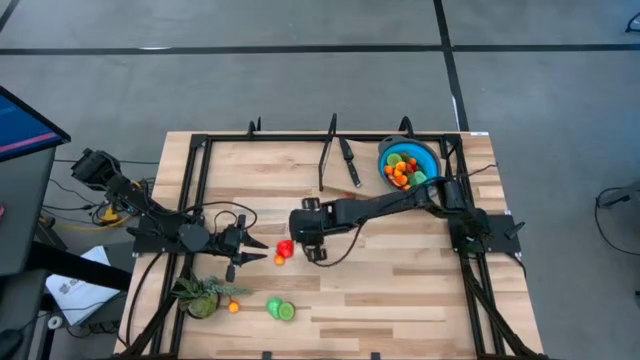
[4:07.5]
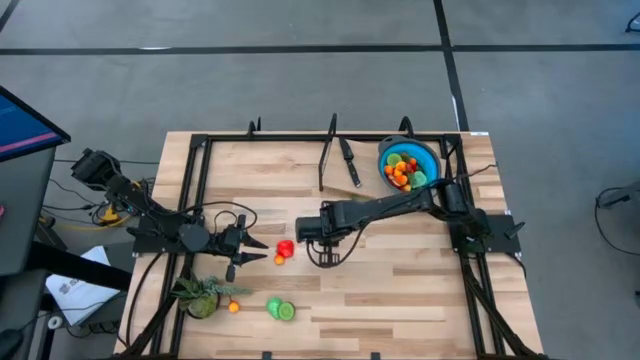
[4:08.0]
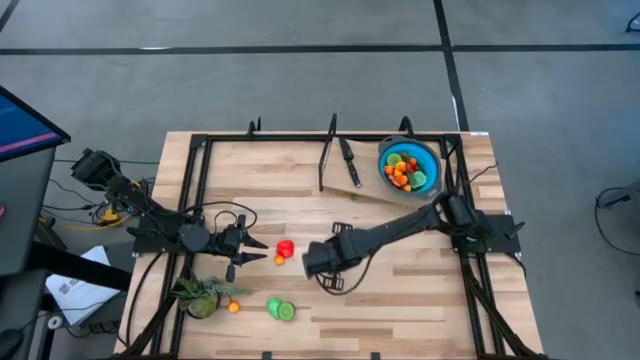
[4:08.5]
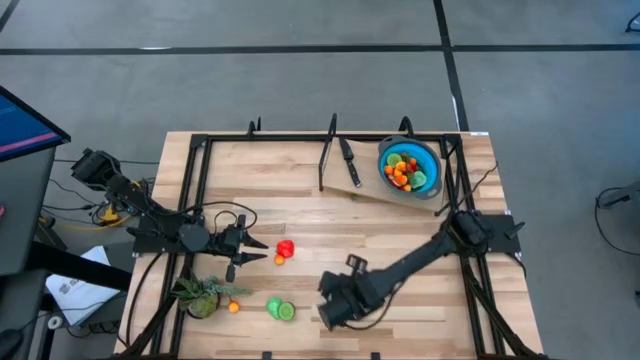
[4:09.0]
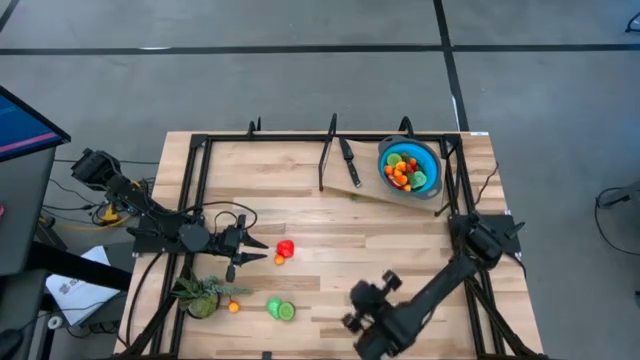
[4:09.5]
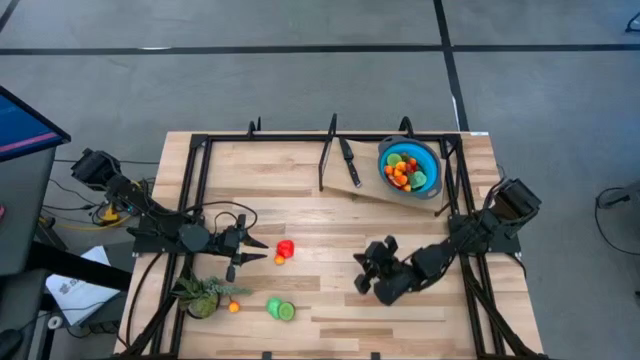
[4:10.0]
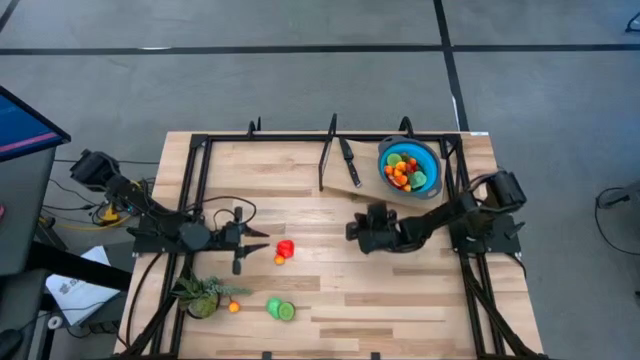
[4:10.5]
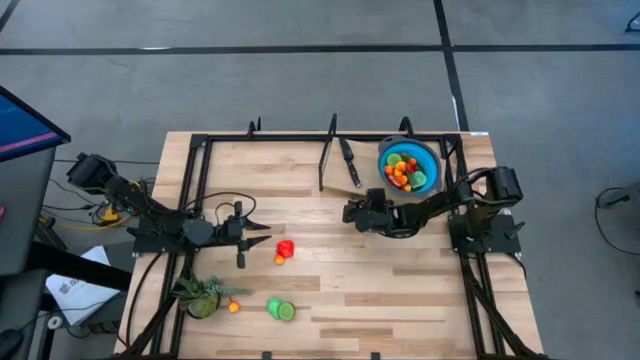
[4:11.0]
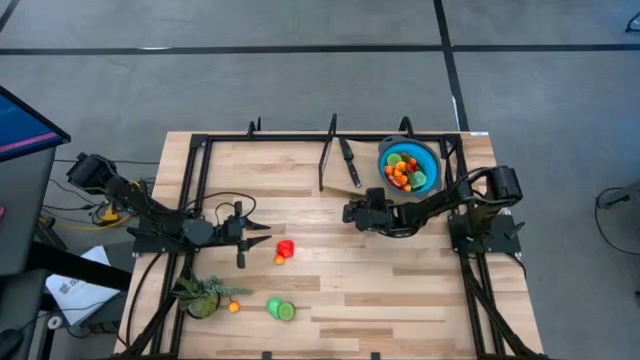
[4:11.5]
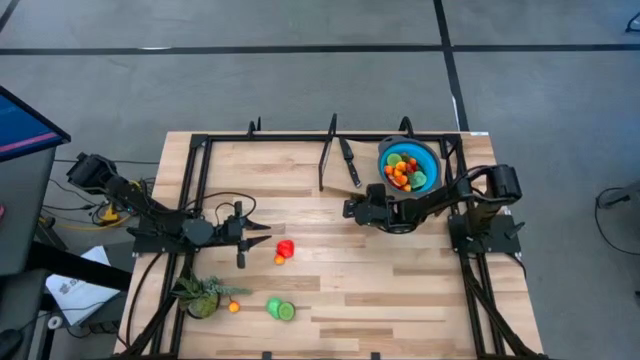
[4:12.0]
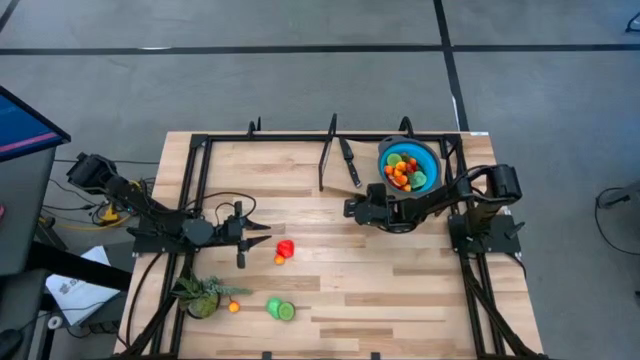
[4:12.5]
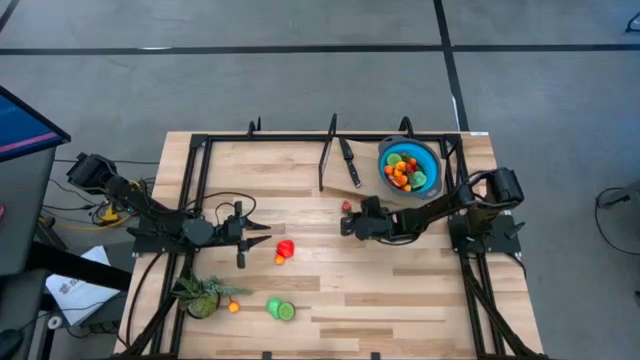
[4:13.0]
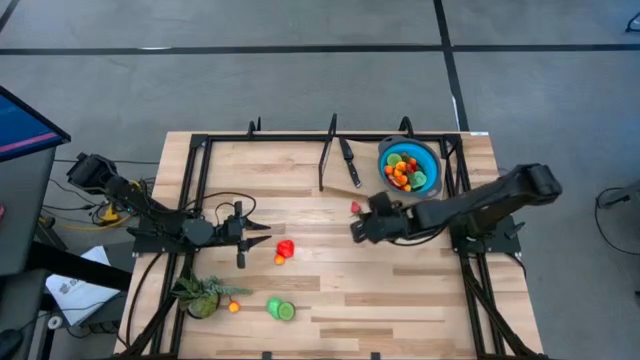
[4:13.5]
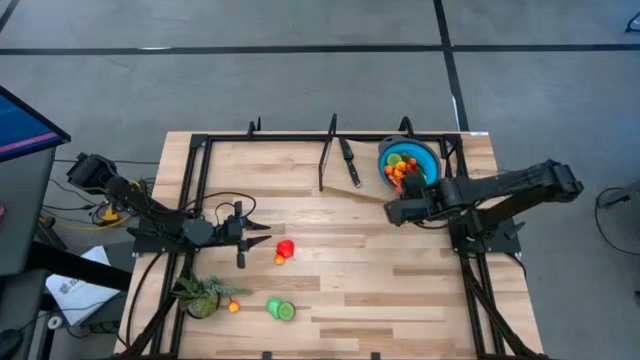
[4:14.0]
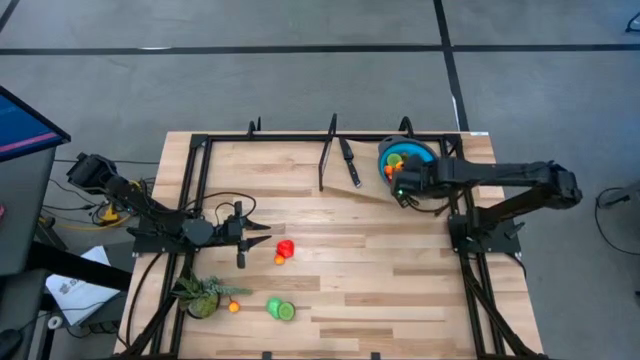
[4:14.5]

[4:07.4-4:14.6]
Task: Pick & Place Fruit
Put the red strawberry into the blue colander

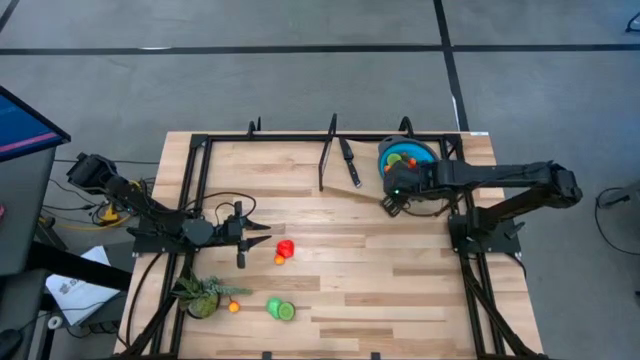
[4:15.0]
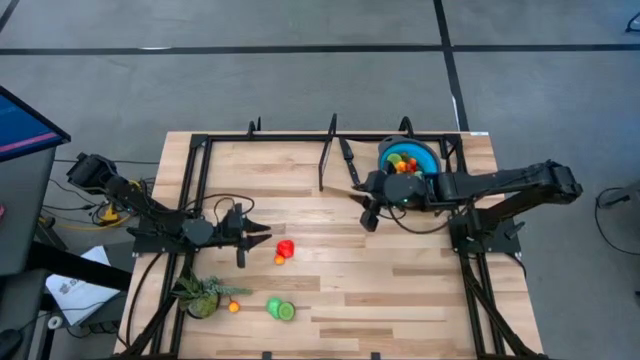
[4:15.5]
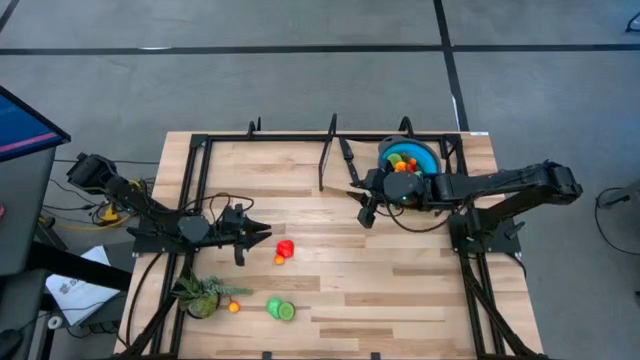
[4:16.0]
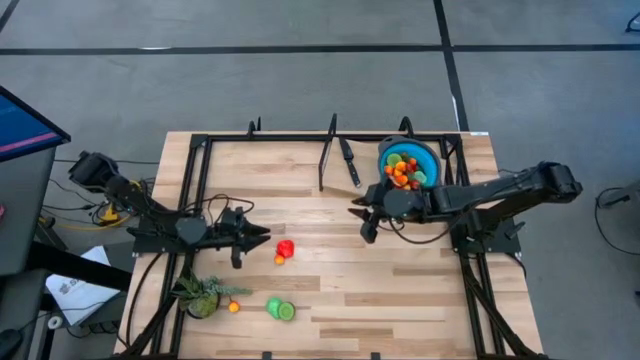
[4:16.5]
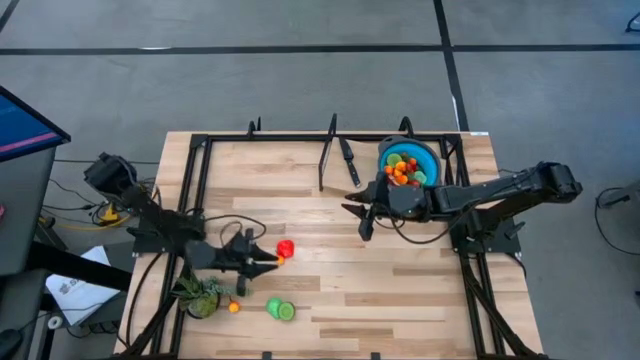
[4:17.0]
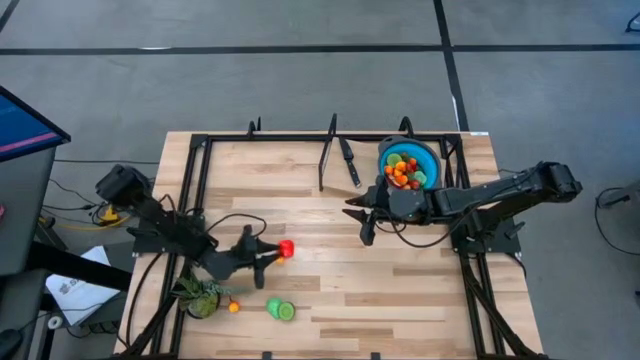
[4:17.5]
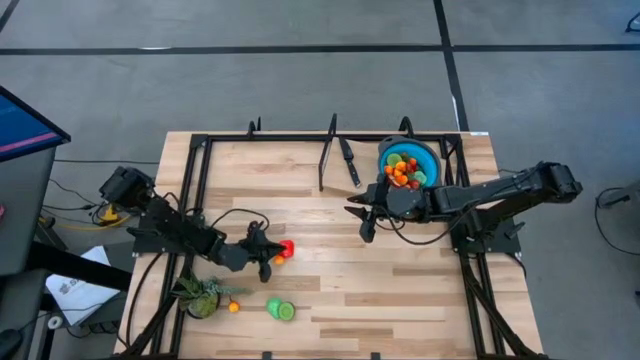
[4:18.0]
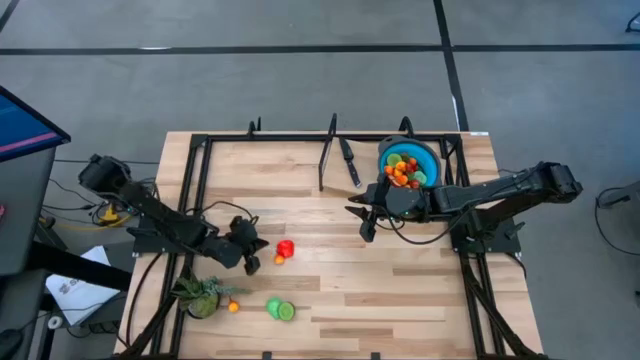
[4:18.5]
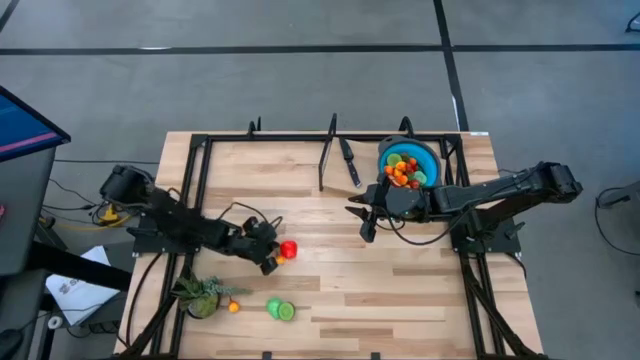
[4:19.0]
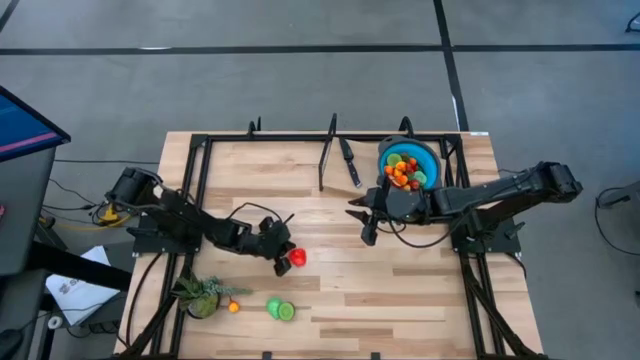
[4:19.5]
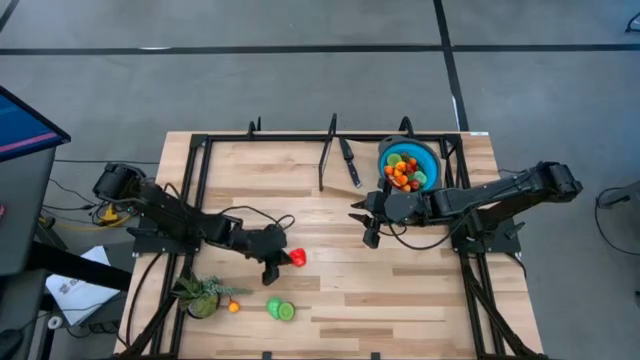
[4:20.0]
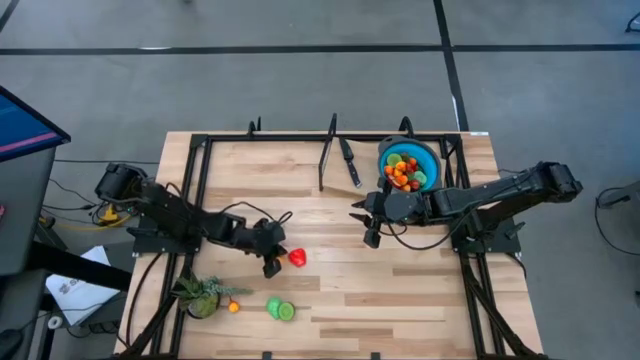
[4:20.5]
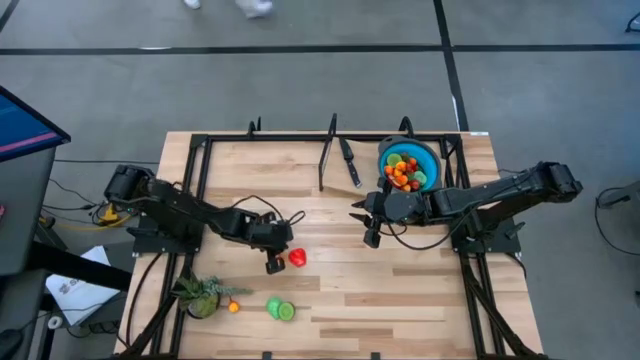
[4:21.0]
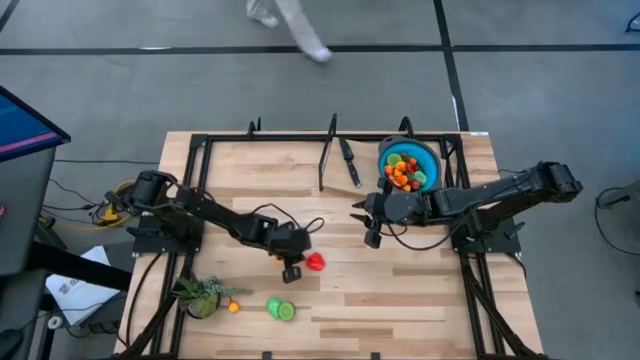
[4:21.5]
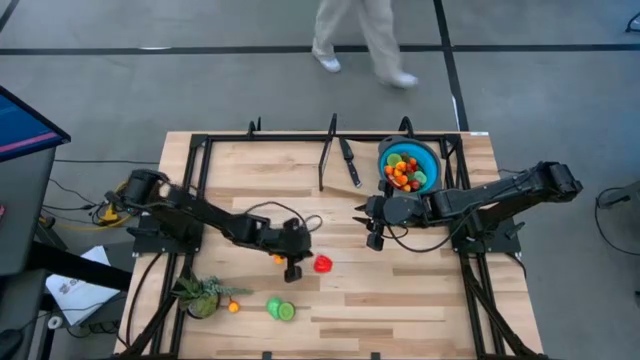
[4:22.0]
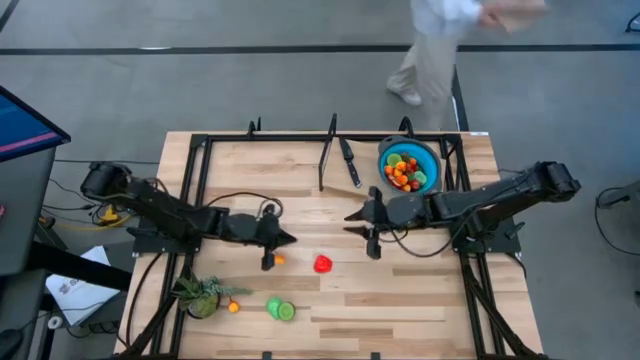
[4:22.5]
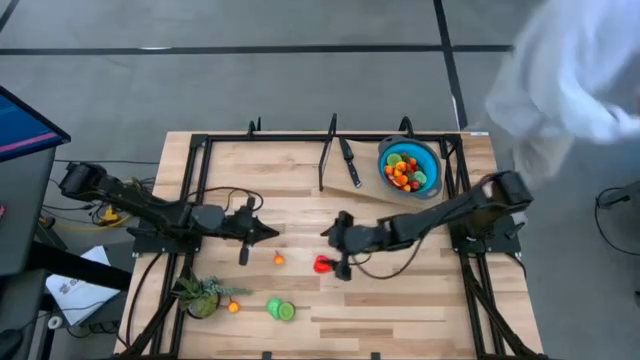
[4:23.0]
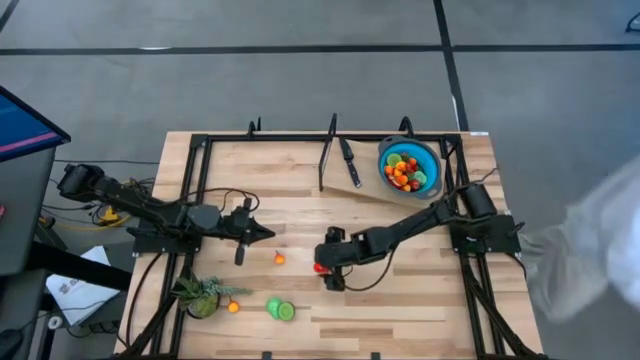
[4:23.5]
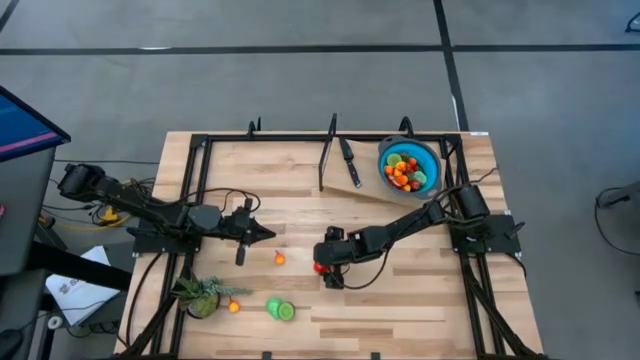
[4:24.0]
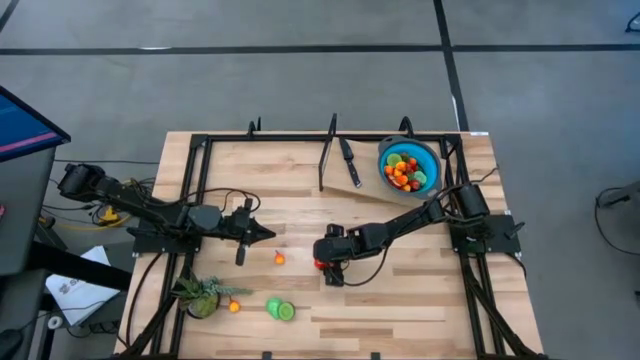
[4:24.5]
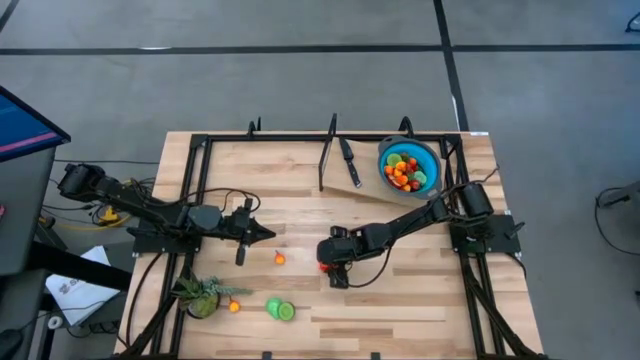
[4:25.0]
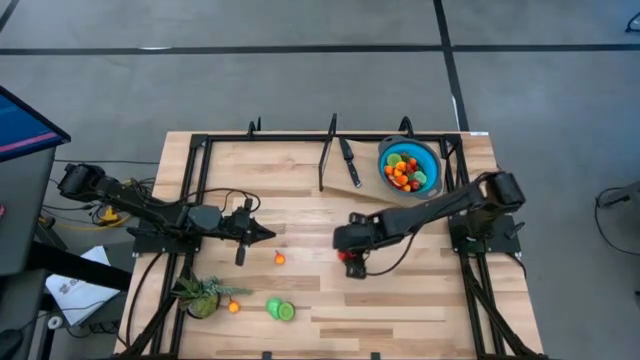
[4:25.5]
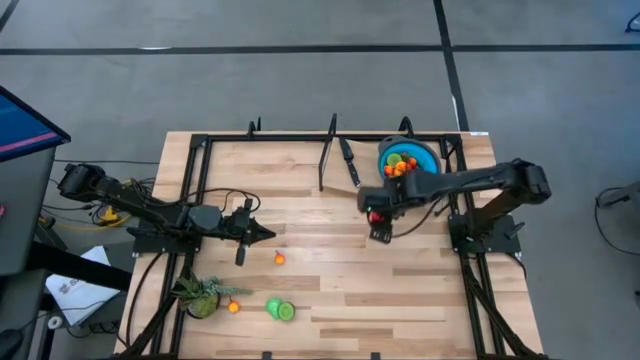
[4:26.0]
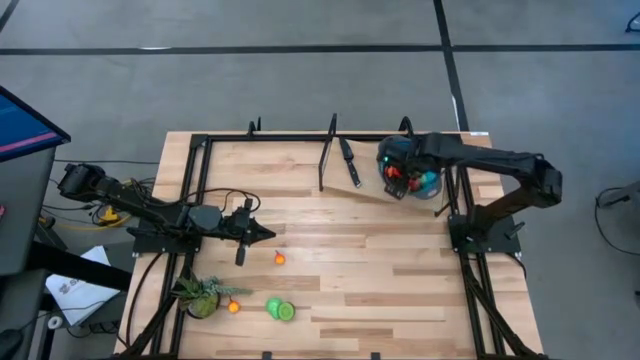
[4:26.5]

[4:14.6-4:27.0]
Put the half red apple into the blue colander

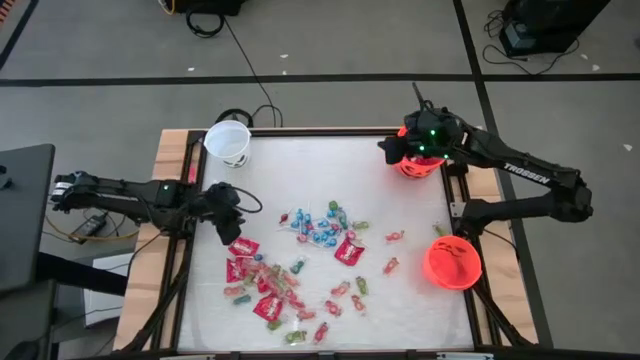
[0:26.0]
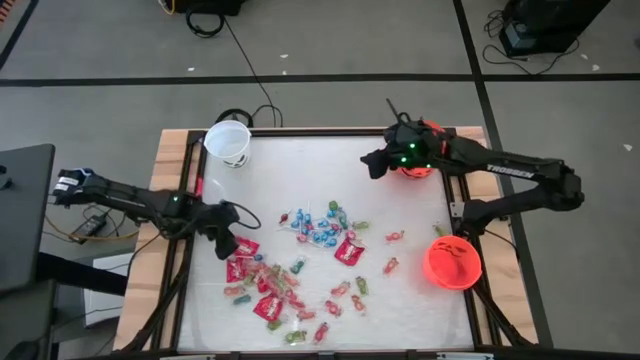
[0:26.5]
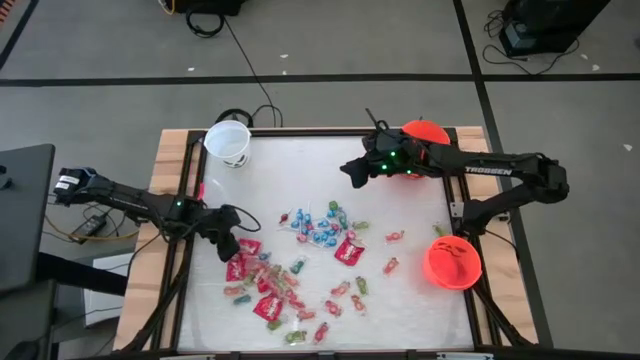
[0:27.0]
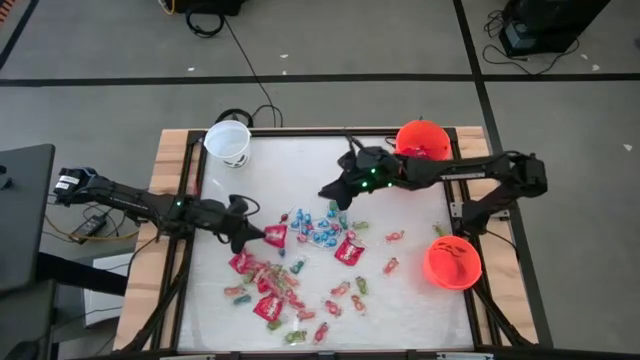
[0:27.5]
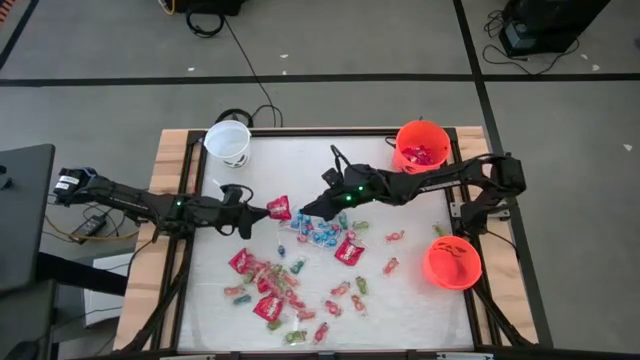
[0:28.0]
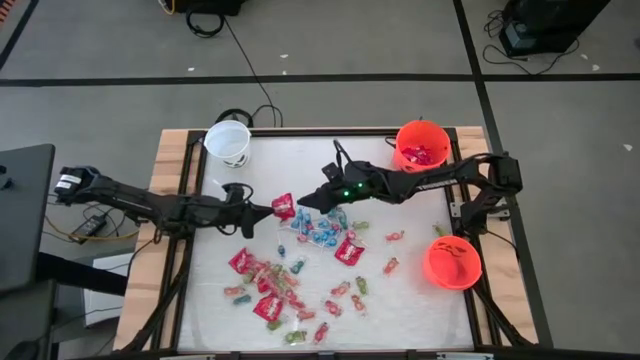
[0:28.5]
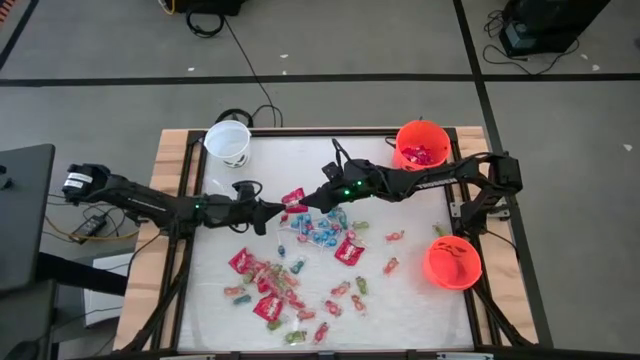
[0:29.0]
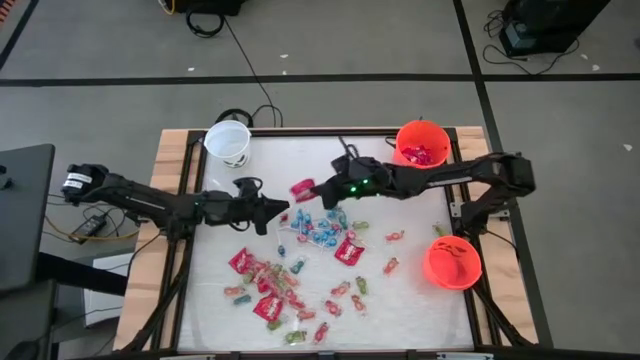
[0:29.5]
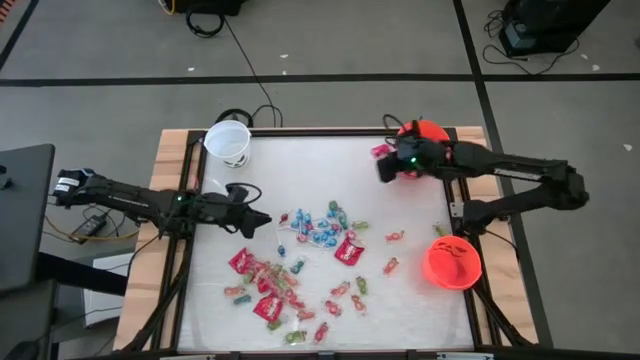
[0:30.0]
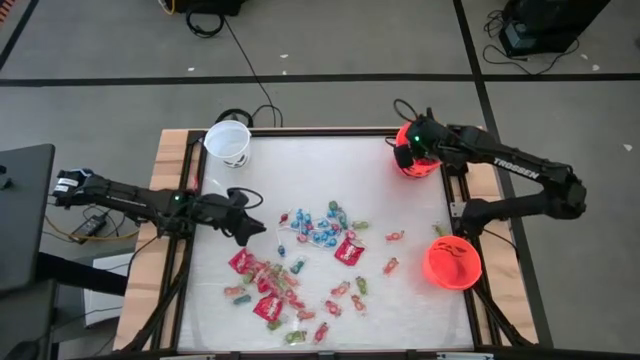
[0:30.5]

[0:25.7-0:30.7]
Task: Sort candy by brand, put in halloween buckets
Put the red candy into the top orange bucket
